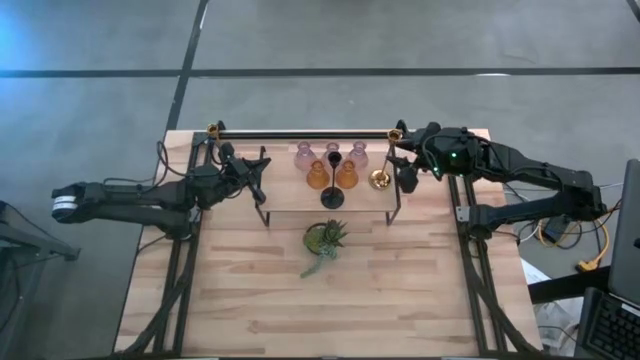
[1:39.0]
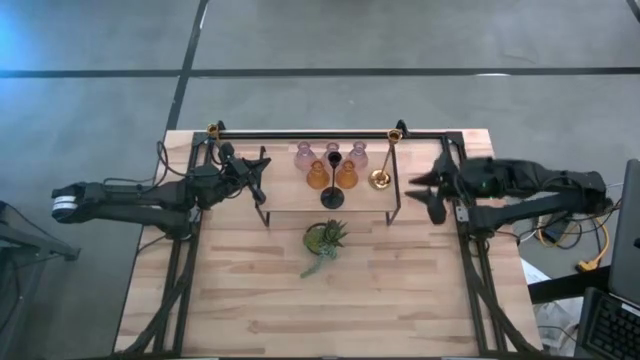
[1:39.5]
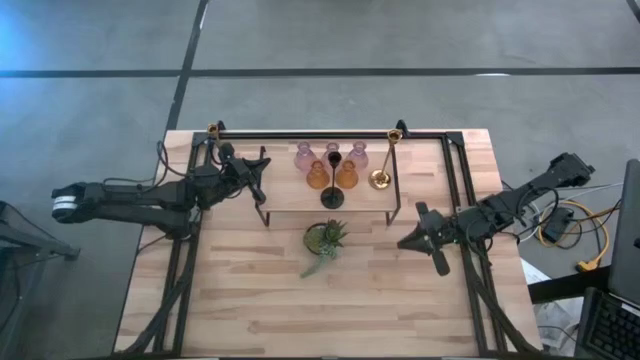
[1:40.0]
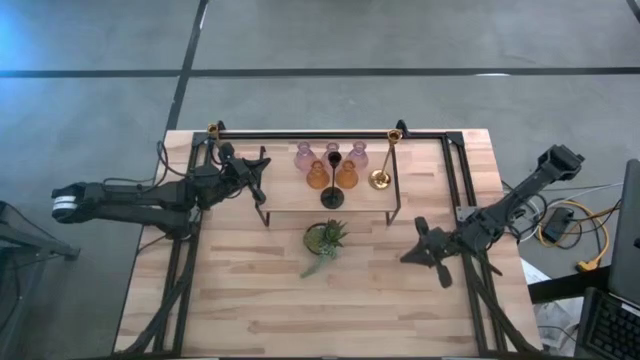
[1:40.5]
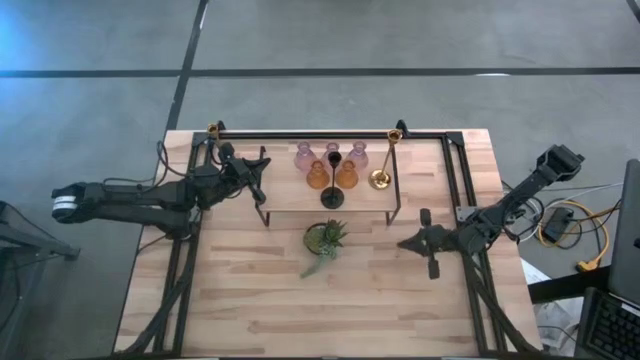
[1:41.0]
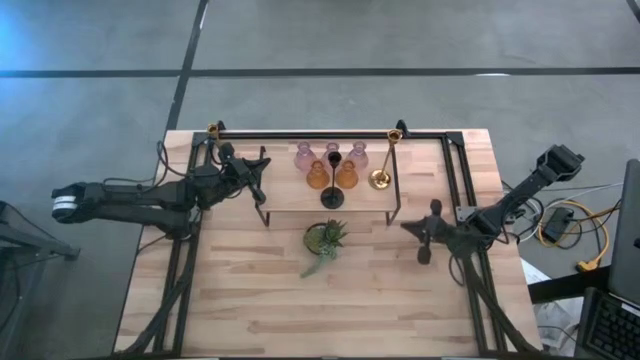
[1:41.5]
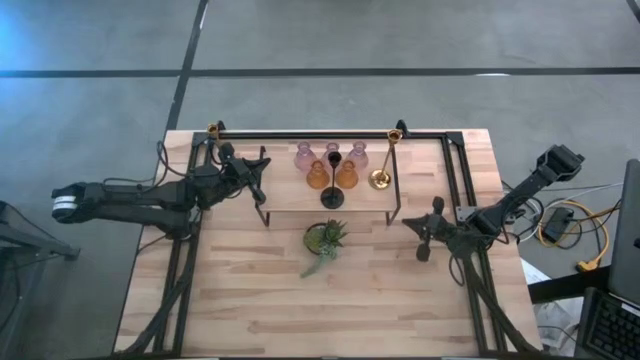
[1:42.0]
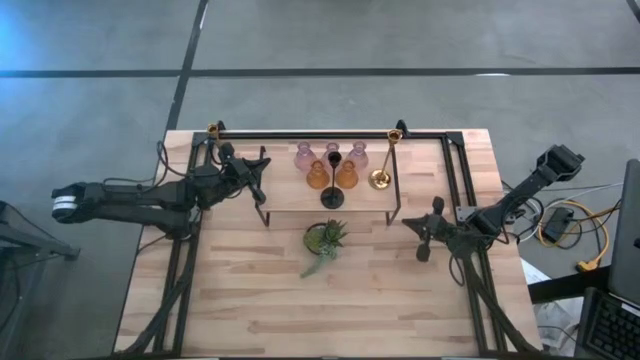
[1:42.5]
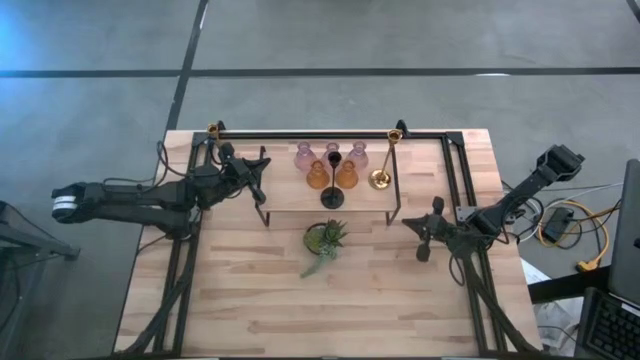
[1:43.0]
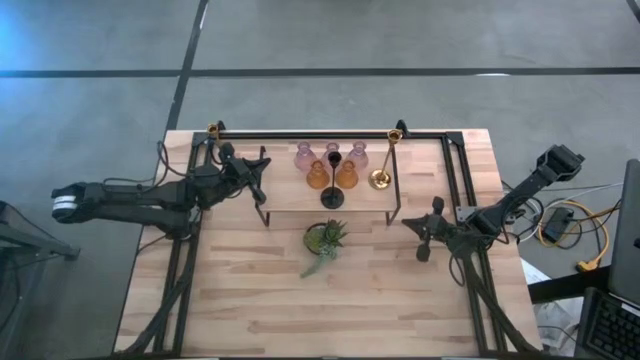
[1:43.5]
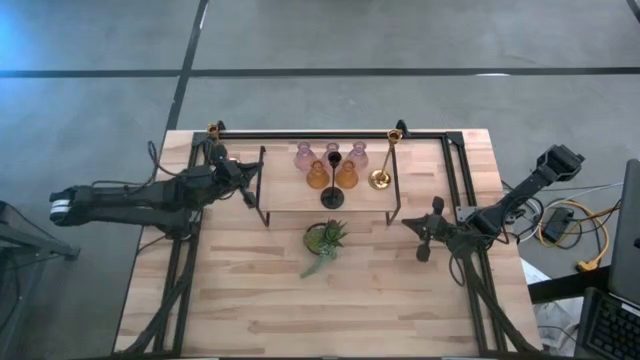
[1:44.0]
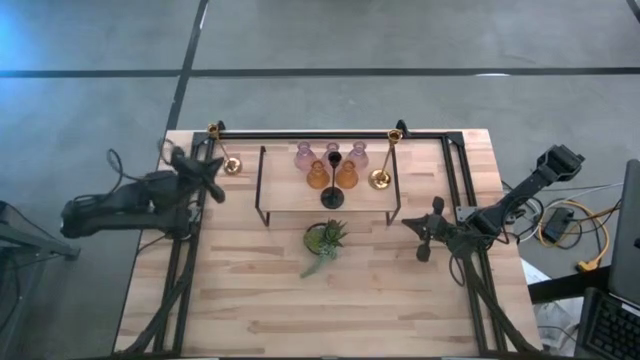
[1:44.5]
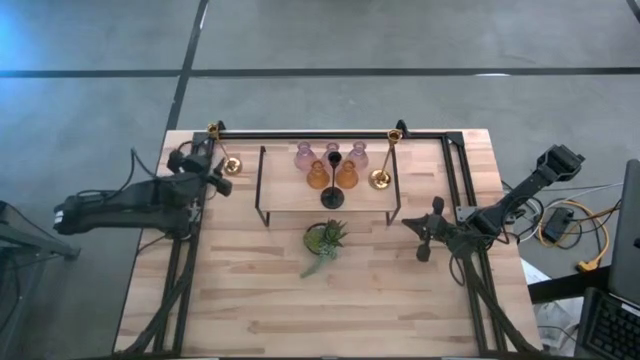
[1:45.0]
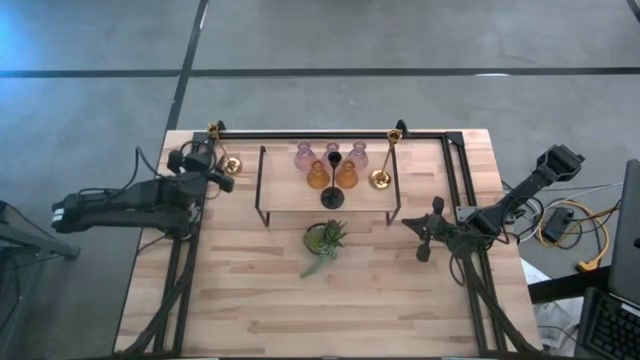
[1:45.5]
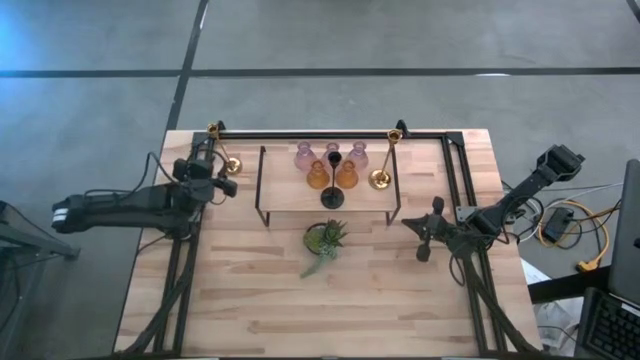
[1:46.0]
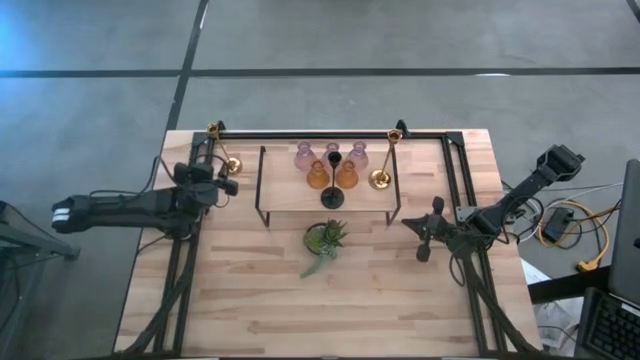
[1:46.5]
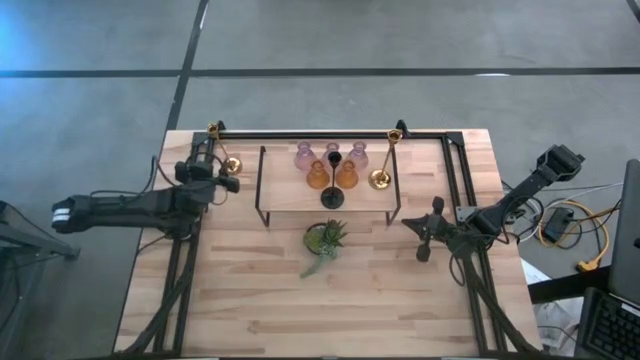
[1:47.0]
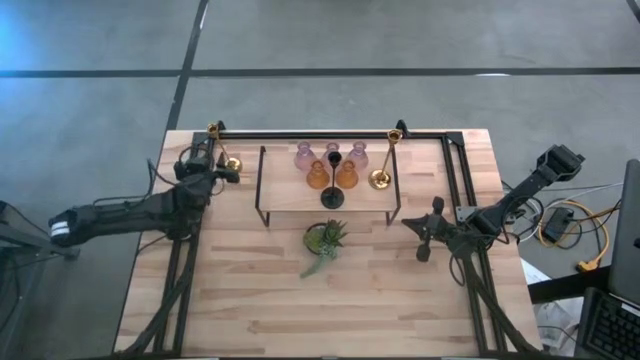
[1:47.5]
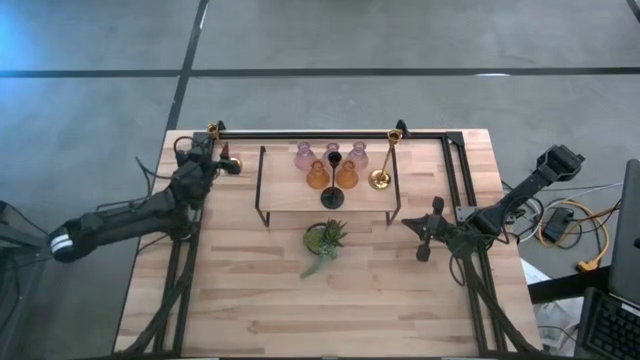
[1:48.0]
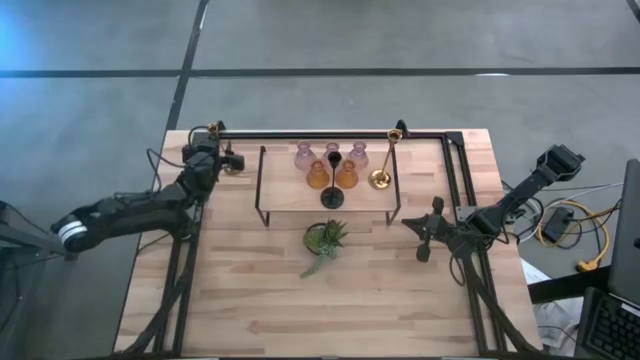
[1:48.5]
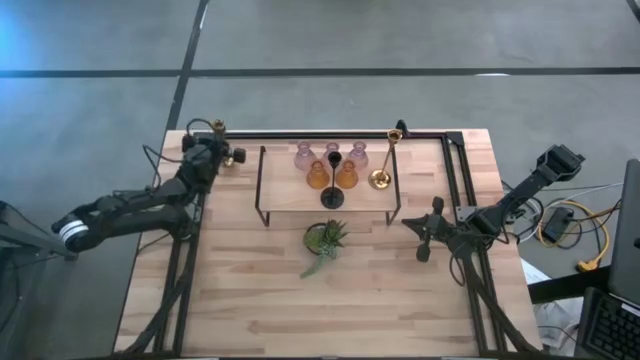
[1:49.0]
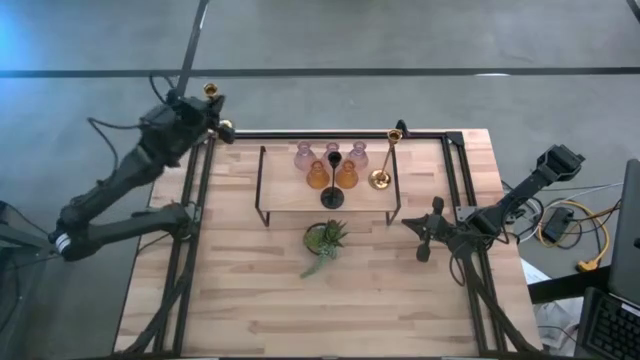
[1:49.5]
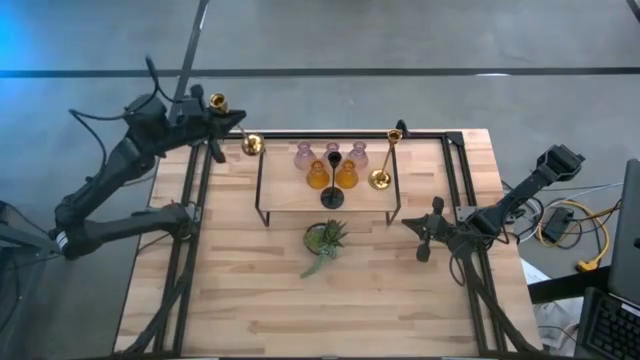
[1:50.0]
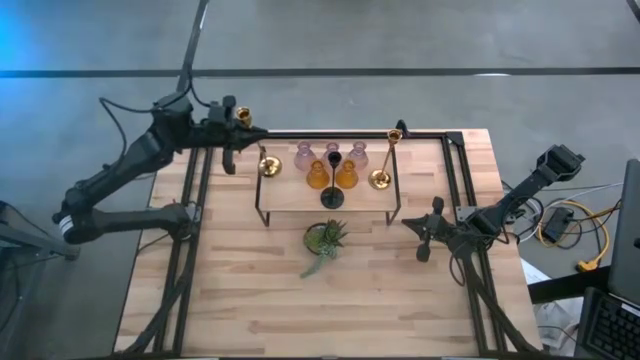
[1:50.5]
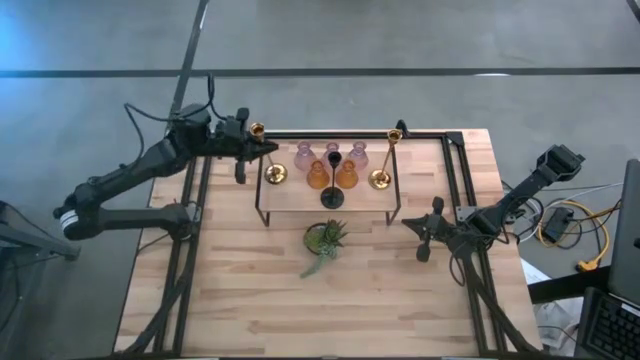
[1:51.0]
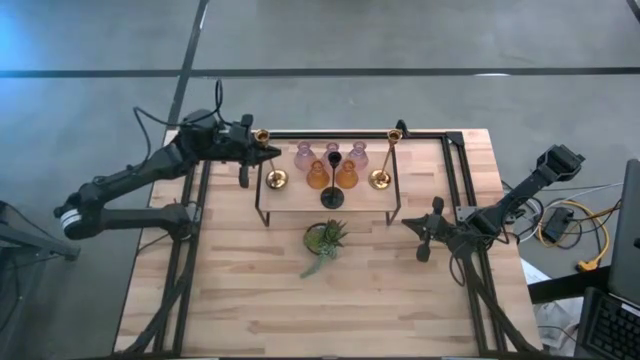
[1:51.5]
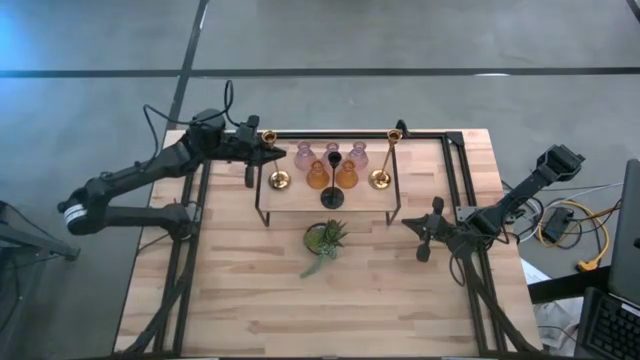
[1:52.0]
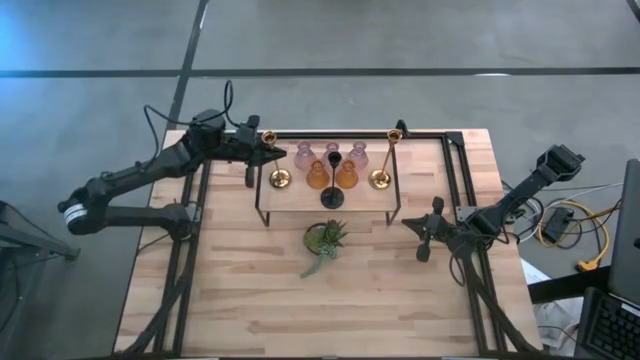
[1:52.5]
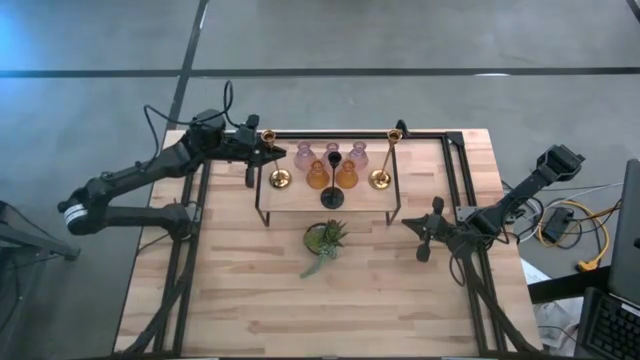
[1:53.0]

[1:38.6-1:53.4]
Task: Pick & Place candle stick holders
Put the gold candle holder on the shelf

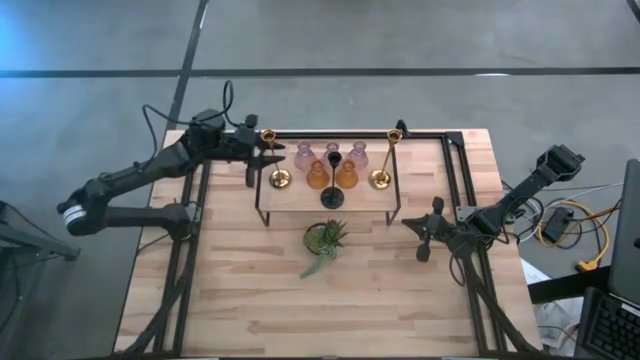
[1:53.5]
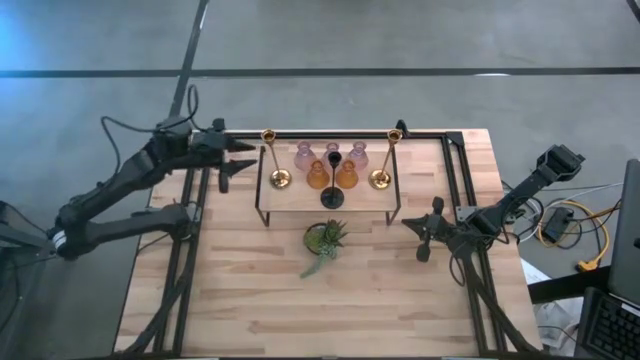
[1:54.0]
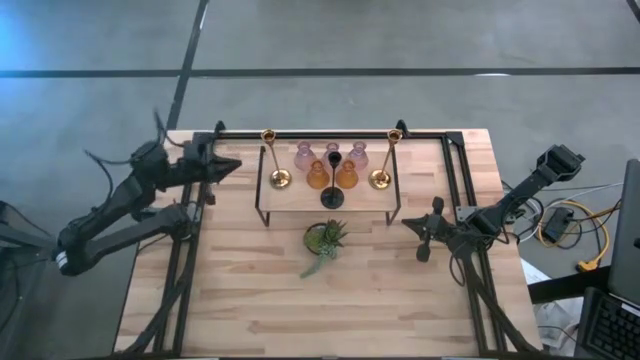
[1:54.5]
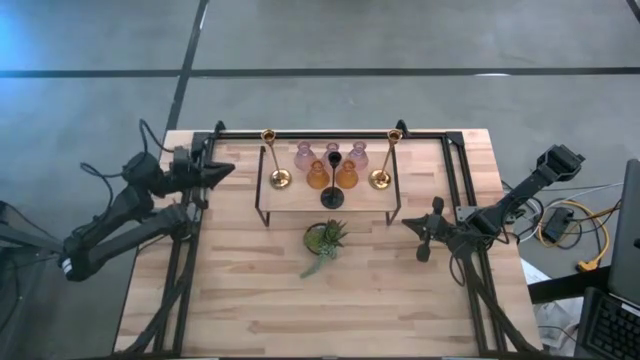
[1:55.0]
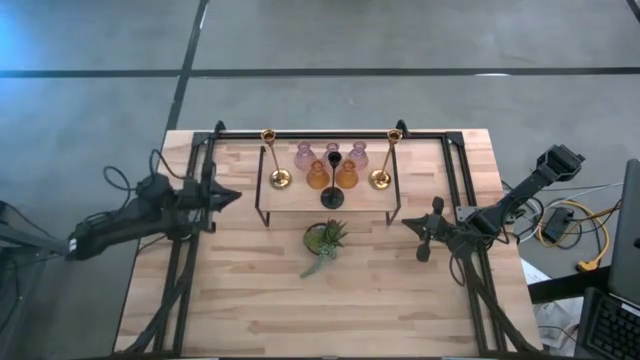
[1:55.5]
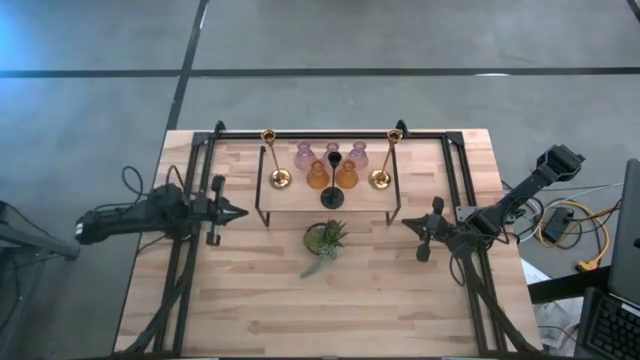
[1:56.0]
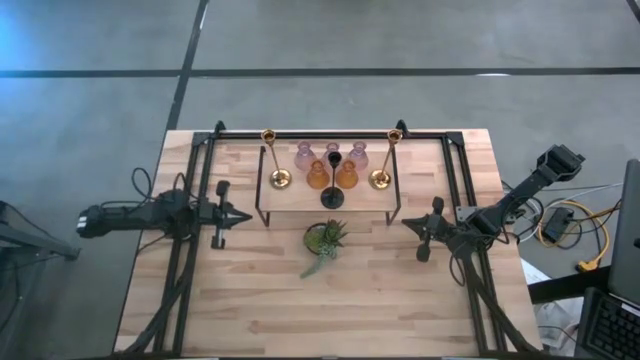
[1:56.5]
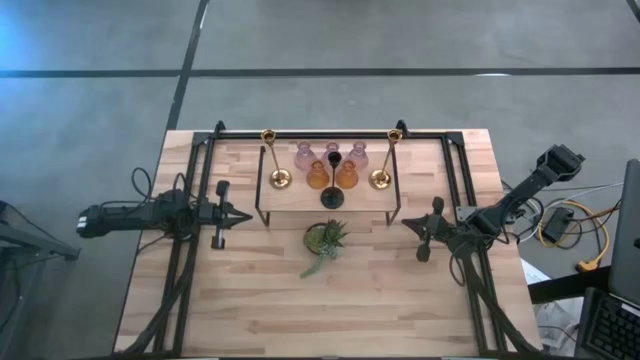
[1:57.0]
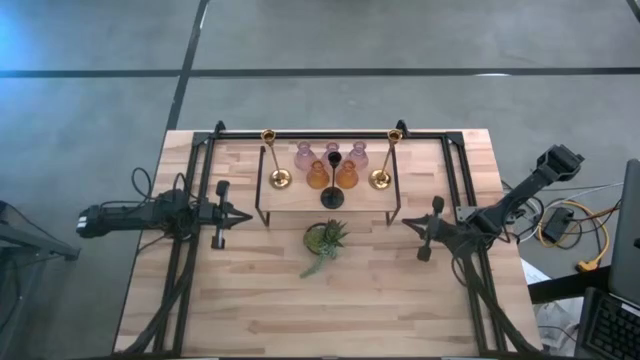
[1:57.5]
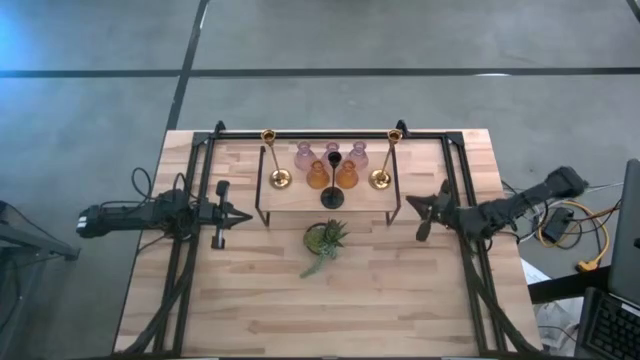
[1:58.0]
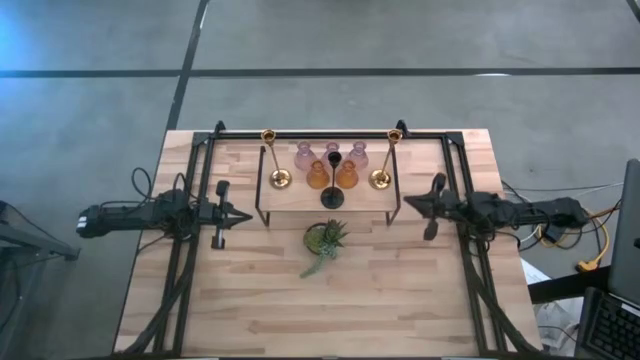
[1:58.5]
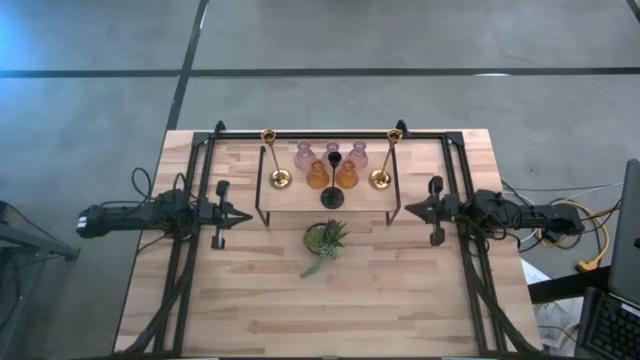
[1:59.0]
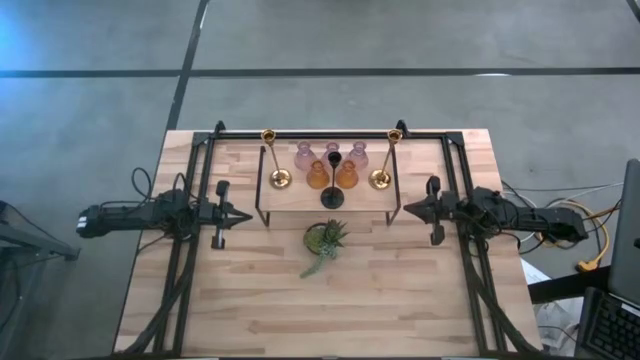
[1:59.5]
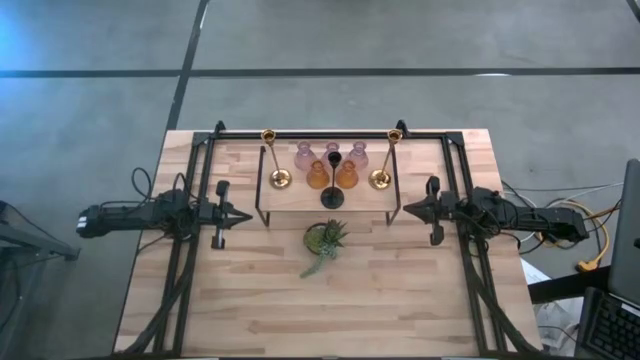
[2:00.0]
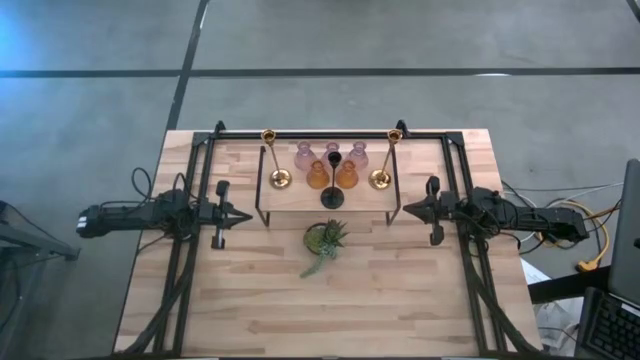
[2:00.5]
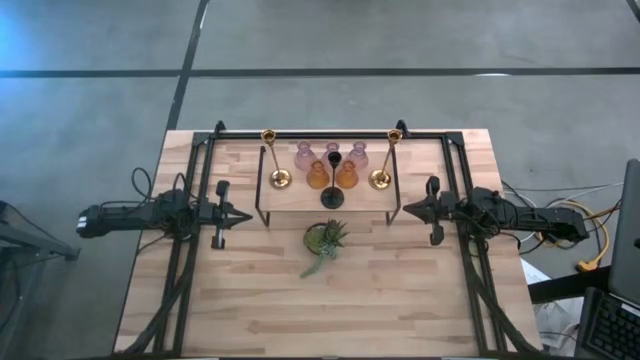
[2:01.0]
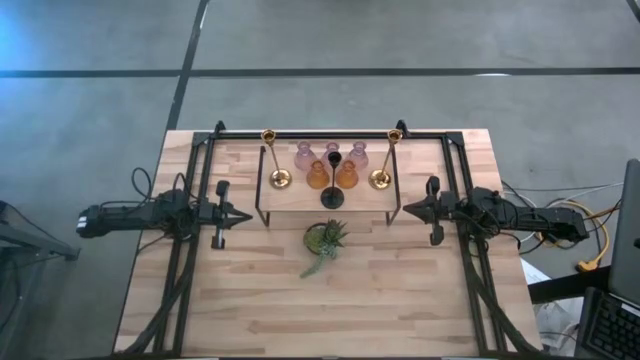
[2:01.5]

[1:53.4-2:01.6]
Return to Home Position
